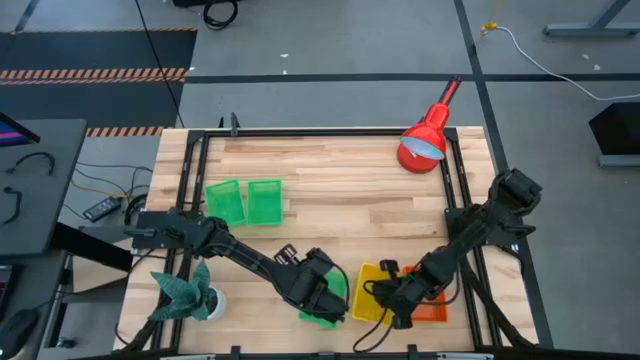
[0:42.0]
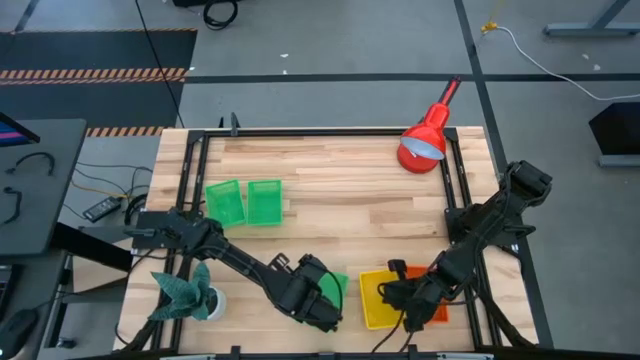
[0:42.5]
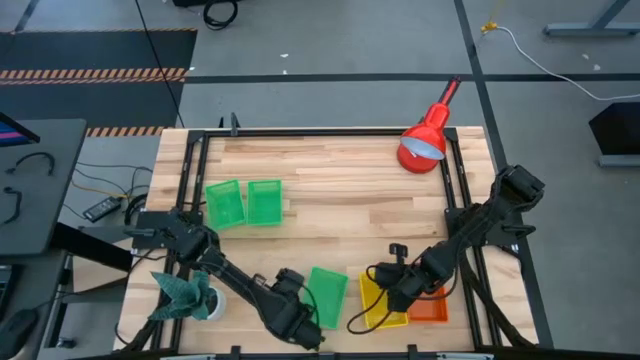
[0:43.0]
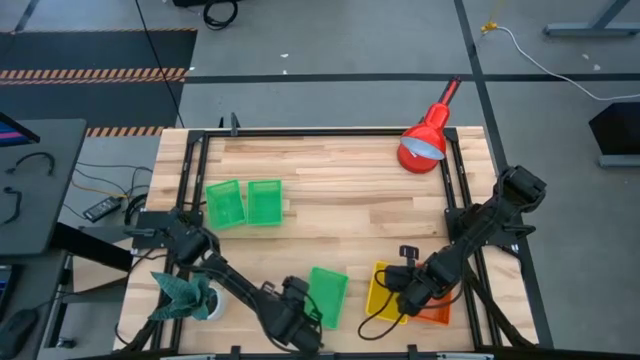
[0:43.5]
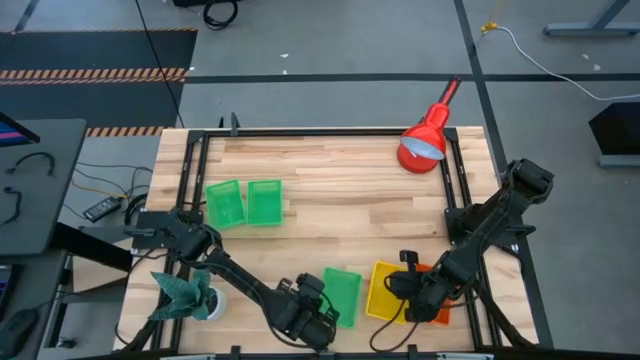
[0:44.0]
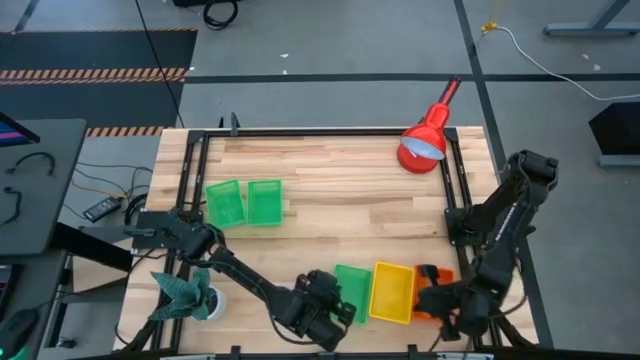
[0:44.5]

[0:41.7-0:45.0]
Adjust all the stacks of baskets

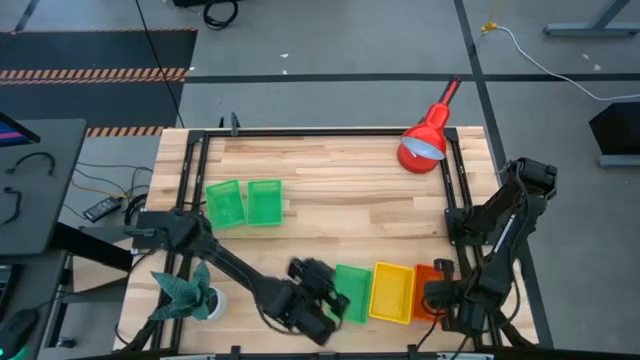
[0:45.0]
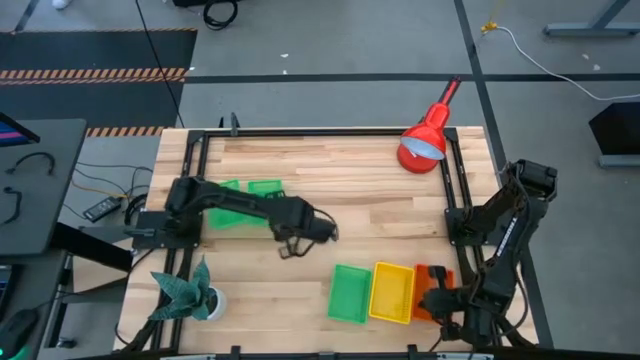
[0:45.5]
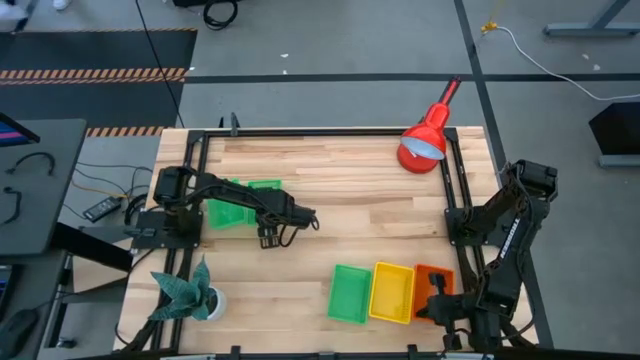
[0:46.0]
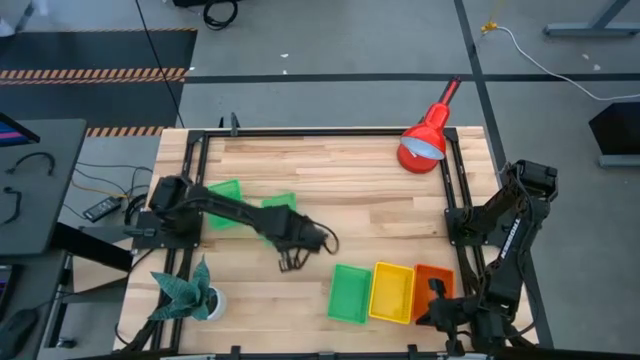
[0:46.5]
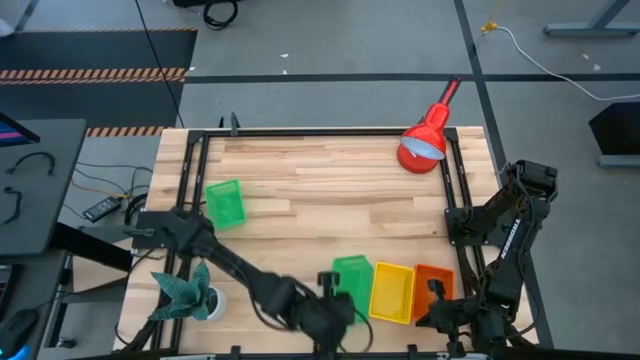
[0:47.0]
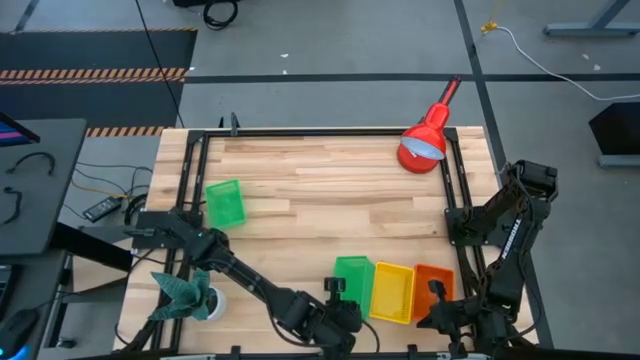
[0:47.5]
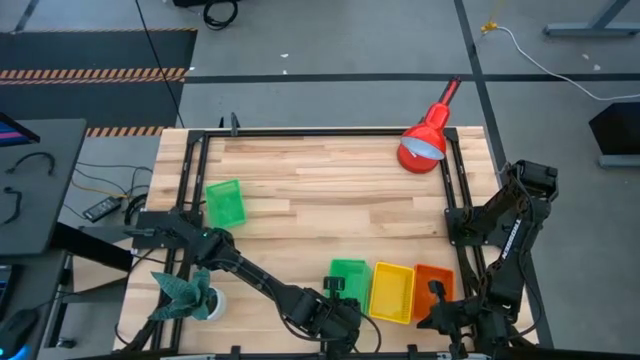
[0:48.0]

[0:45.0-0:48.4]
Stack the top center green basket on the right basket bin

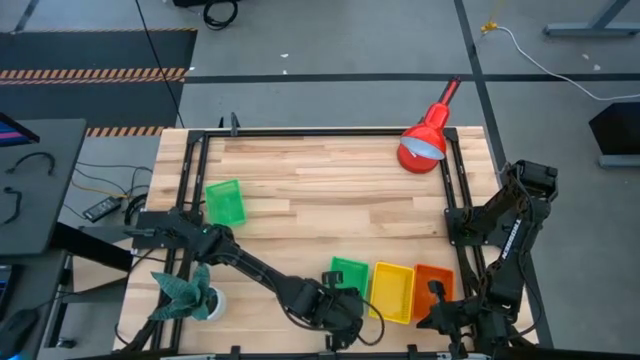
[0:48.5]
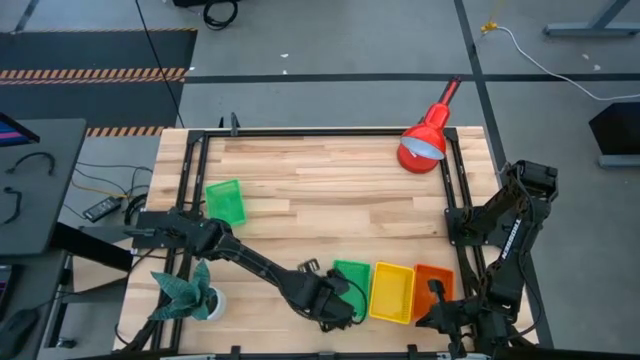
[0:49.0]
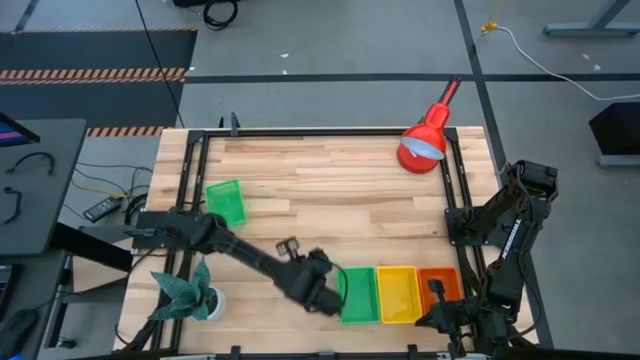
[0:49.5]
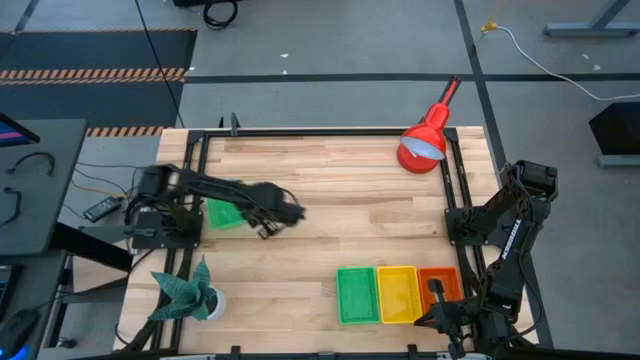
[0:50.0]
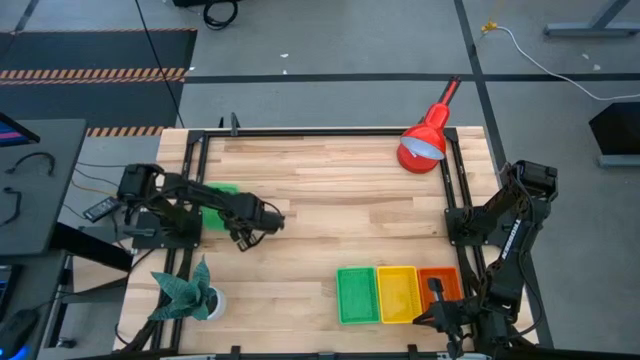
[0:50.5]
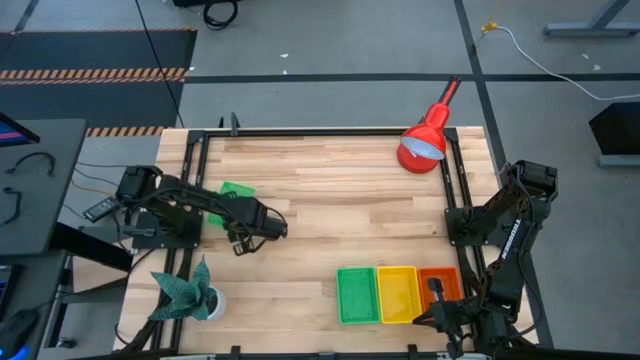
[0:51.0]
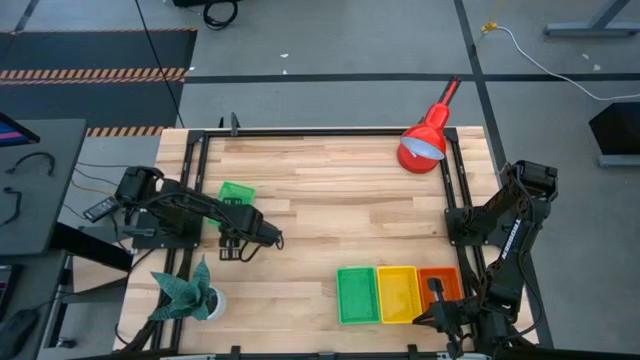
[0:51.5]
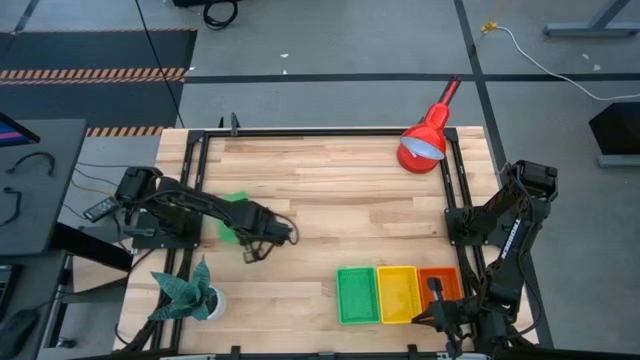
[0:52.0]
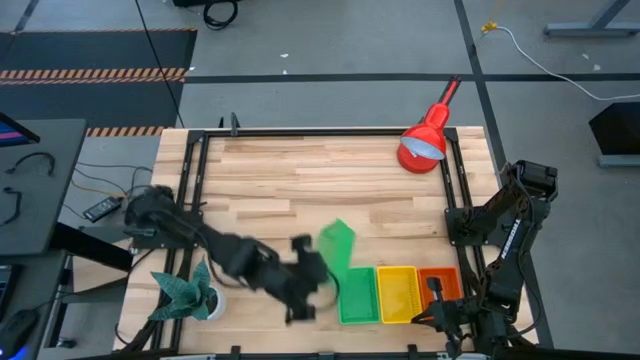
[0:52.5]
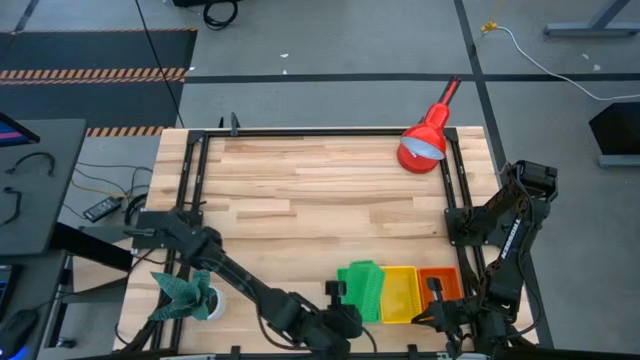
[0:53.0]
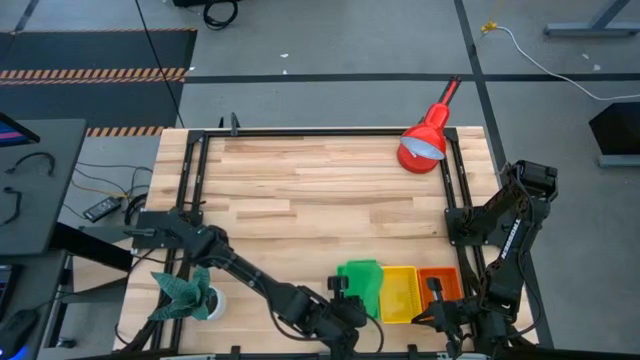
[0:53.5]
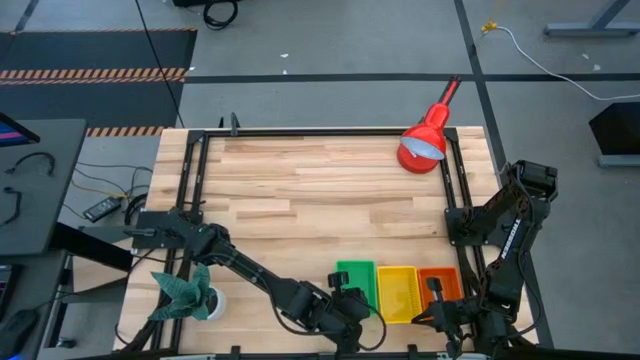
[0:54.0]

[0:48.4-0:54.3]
Stack the left green basket on the bottom green basket

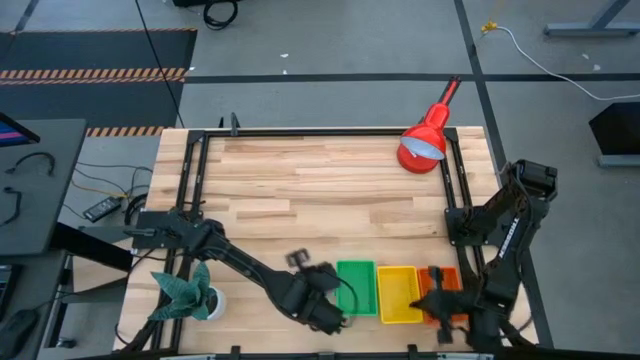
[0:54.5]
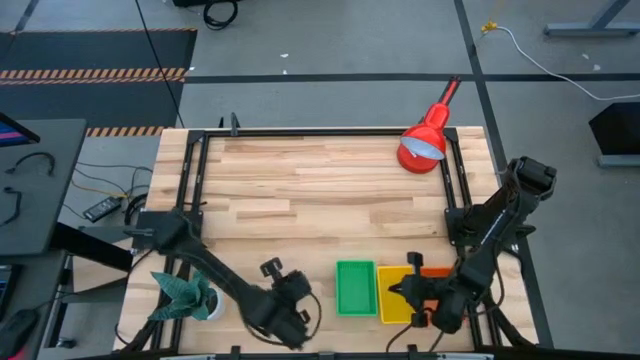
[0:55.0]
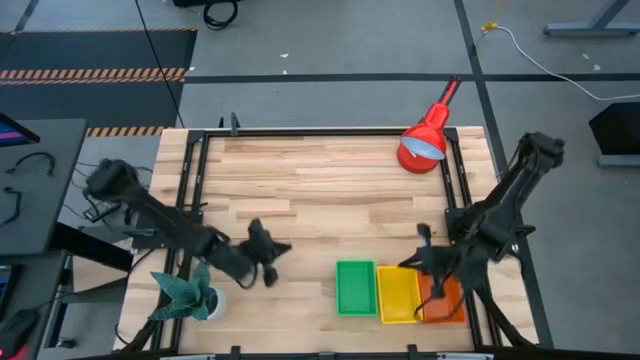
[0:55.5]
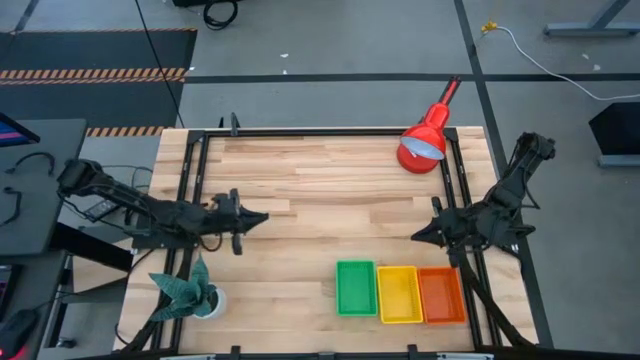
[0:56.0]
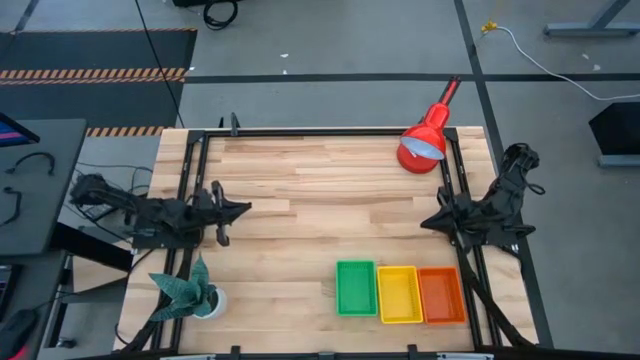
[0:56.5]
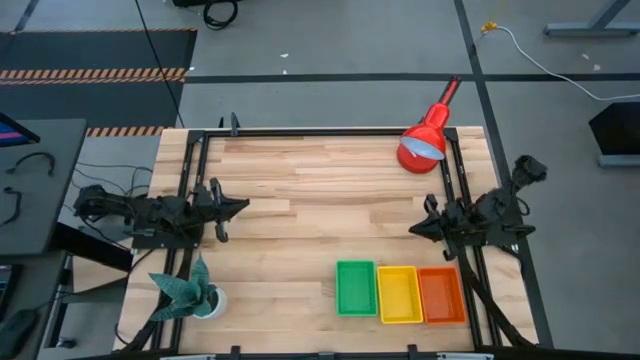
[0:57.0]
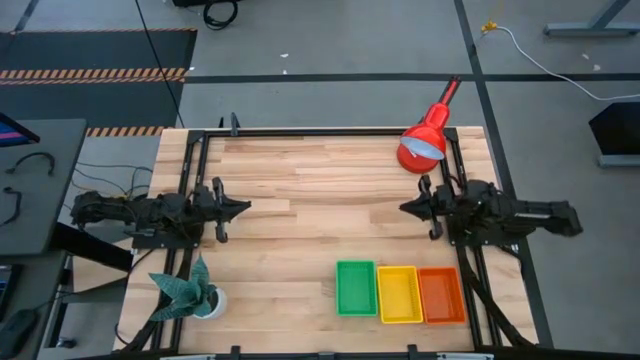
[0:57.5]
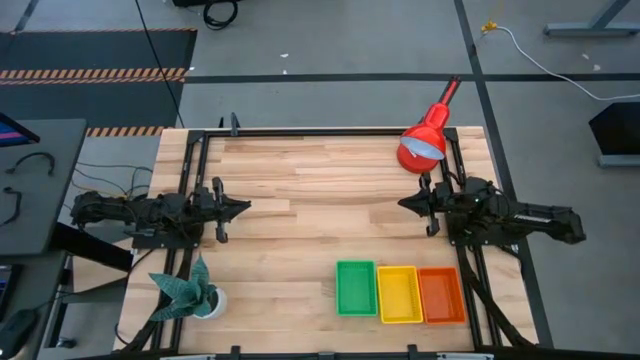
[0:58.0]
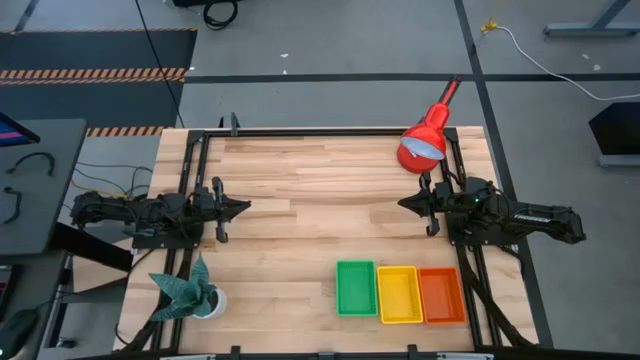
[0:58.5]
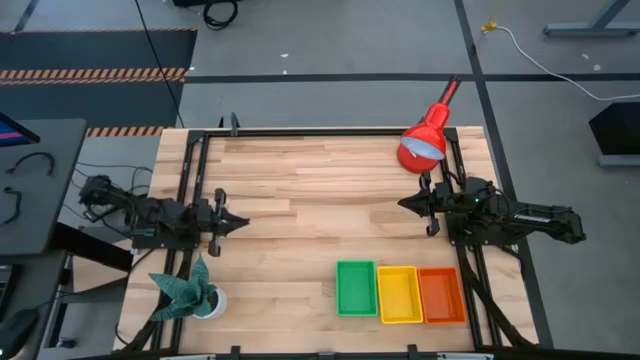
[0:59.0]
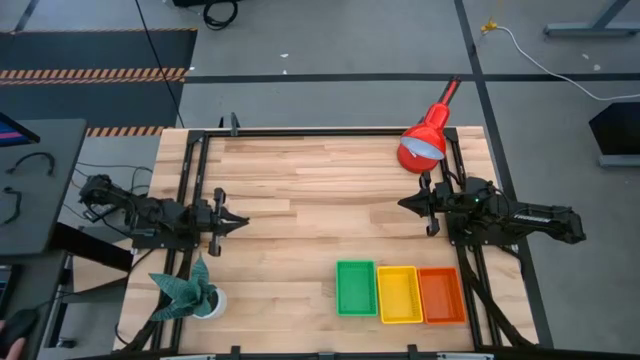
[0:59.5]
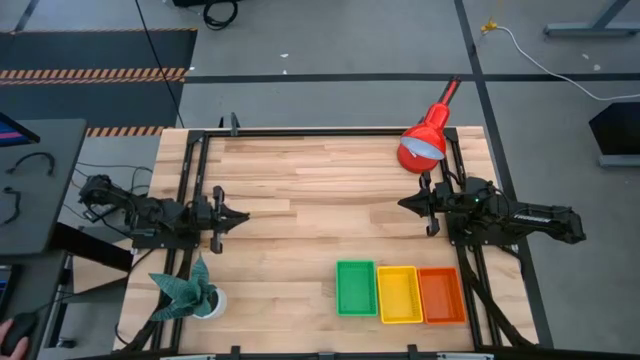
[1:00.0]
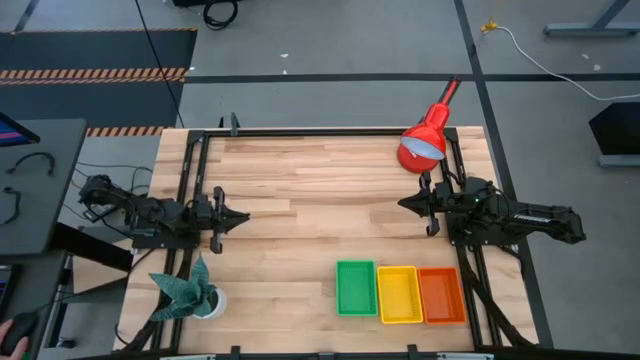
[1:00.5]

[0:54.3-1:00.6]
Return to Home Position
